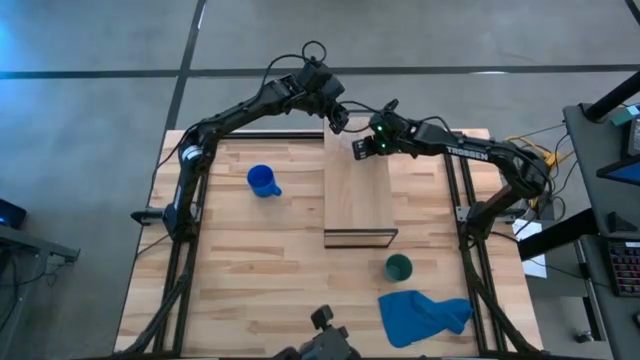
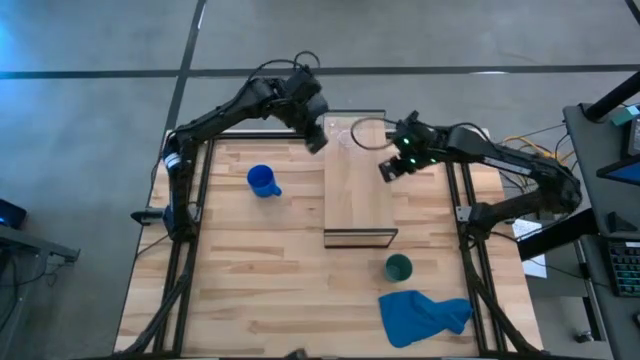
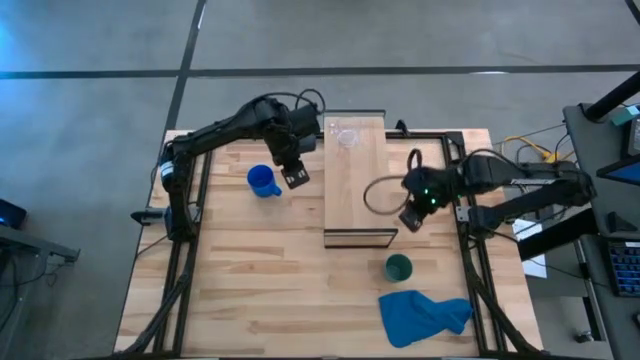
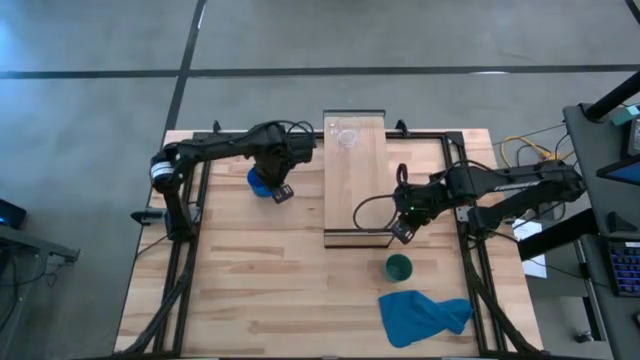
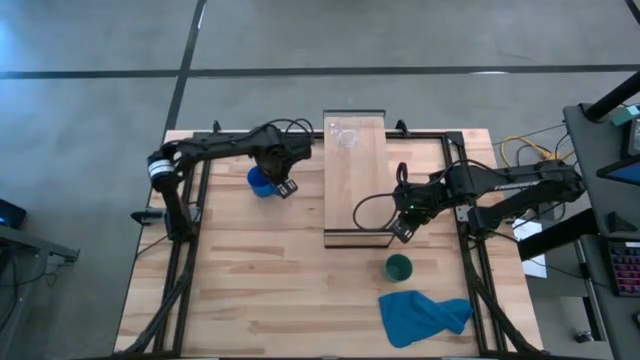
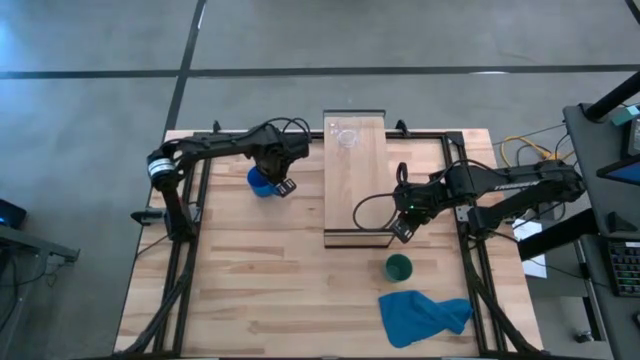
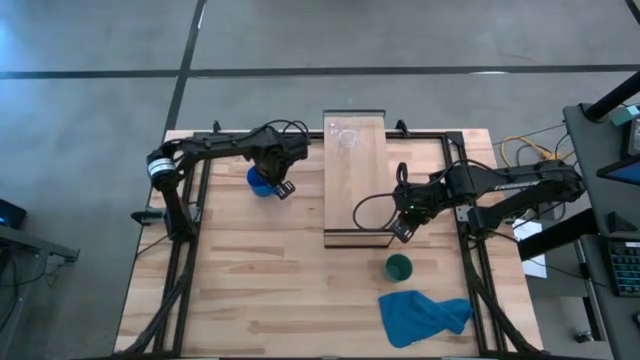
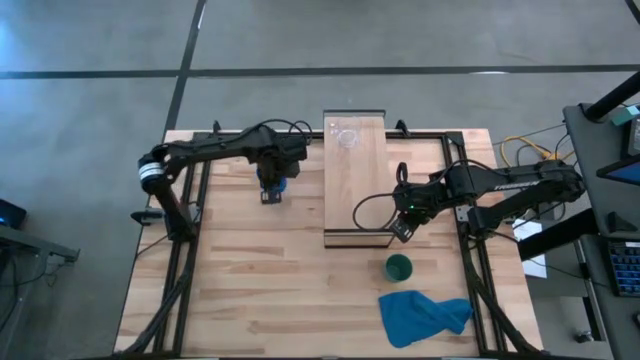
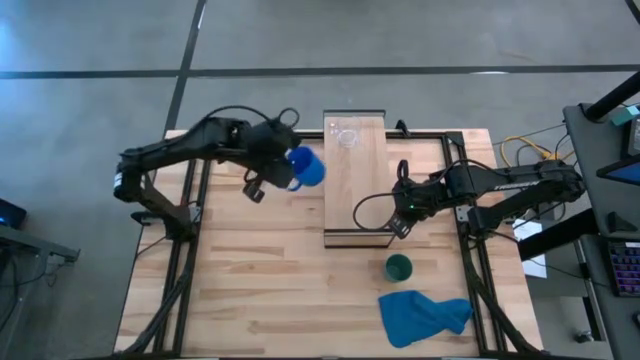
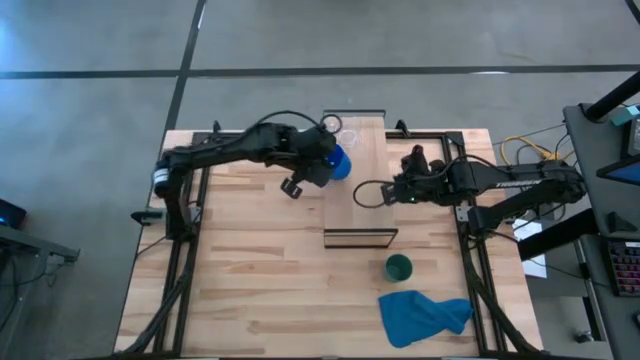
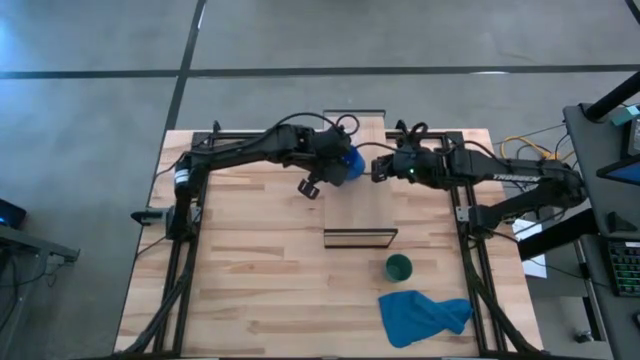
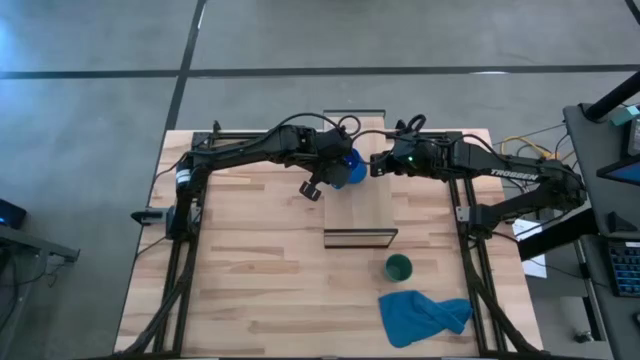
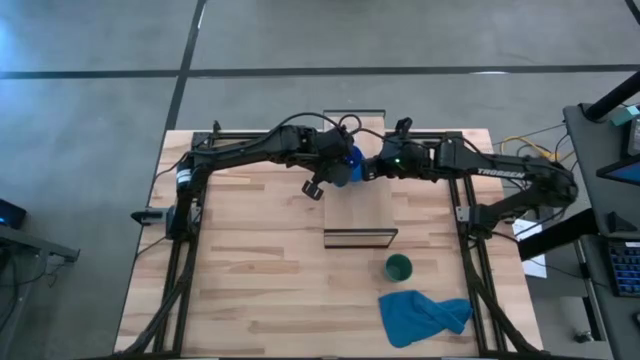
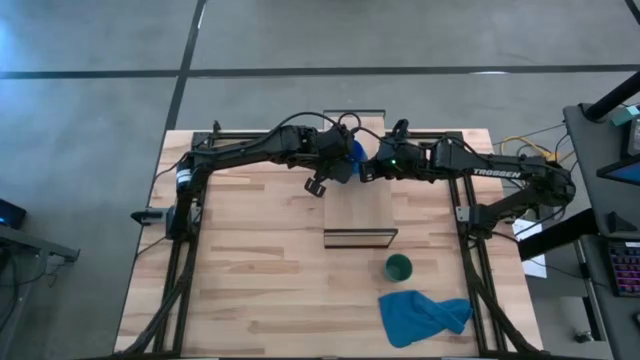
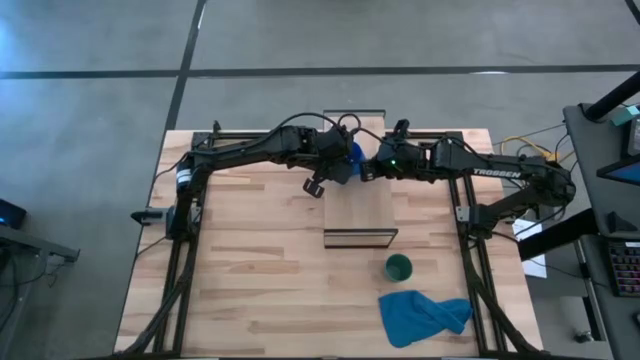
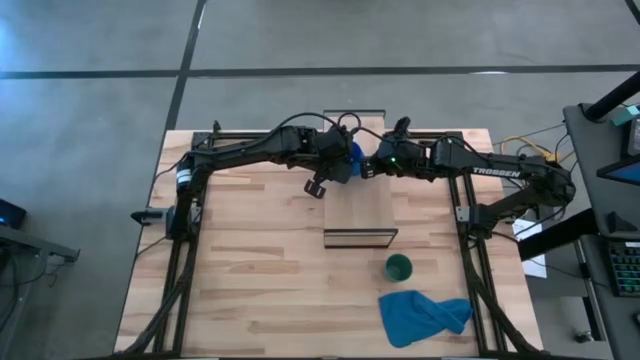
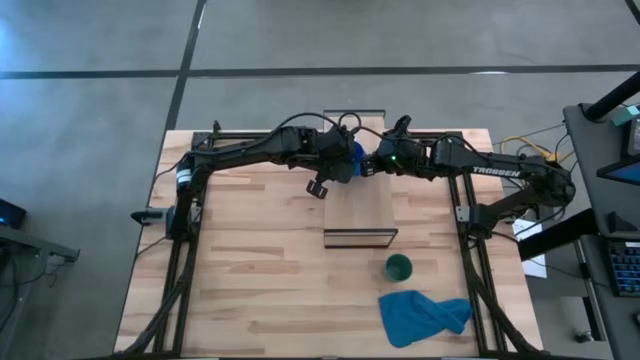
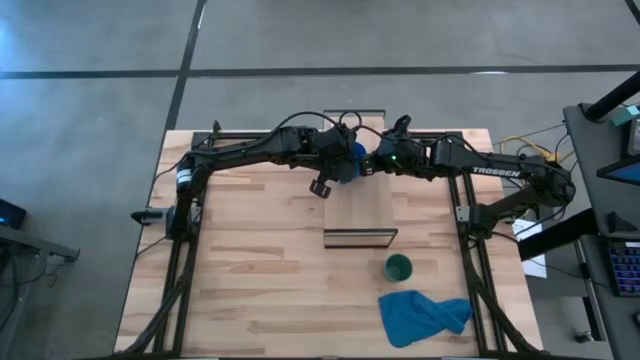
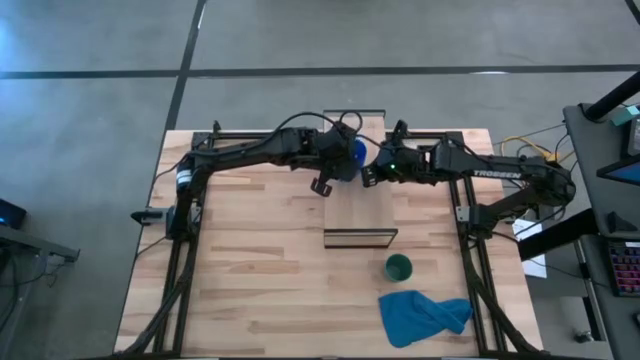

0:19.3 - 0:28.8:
Task: Stack small to large cups/mugs on shelf
Put the blue mug on the shelf

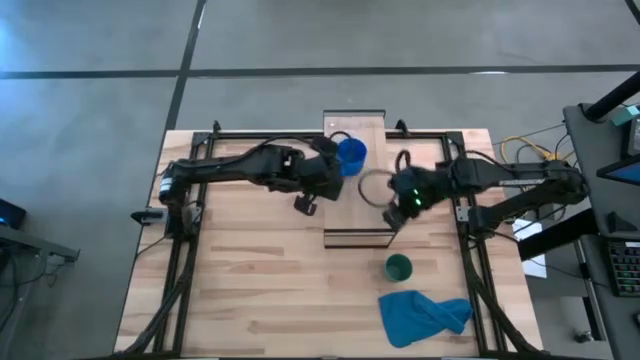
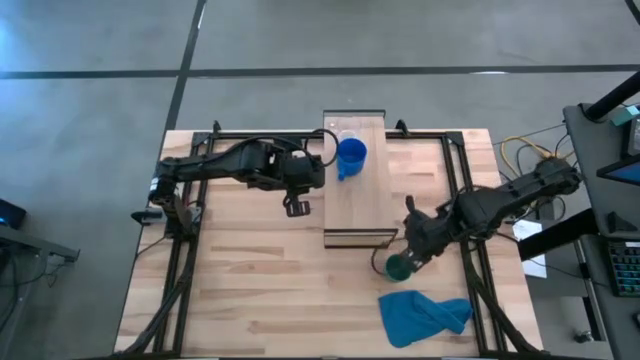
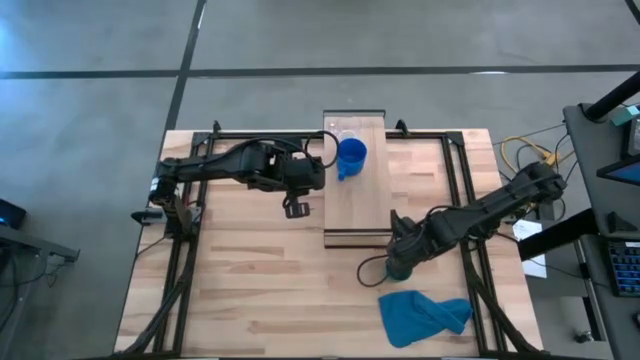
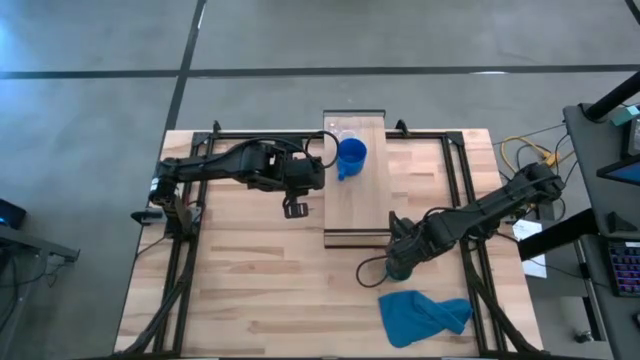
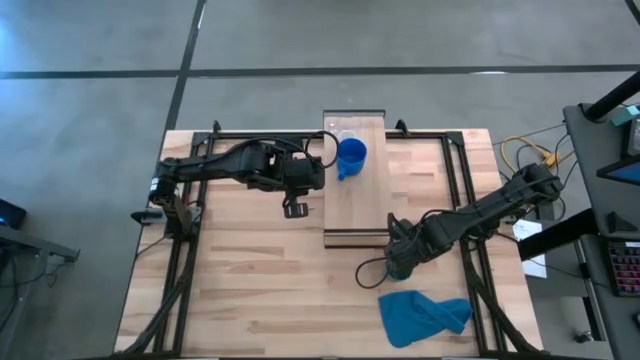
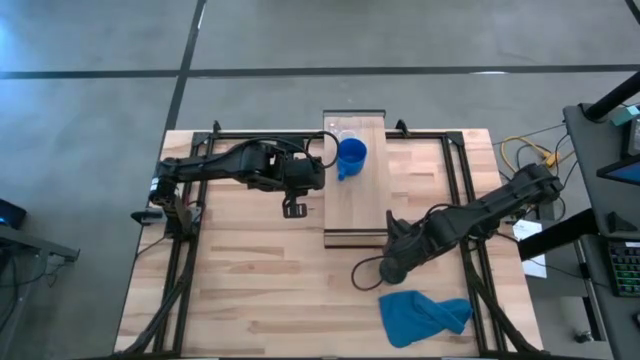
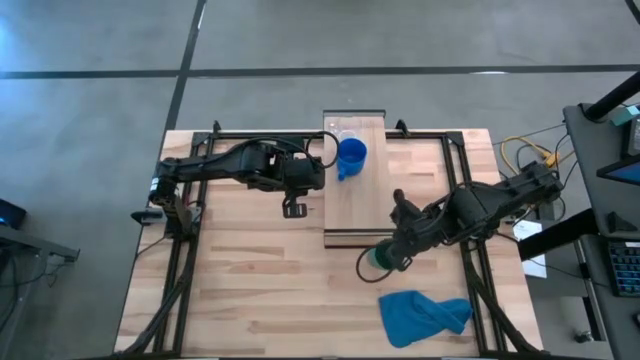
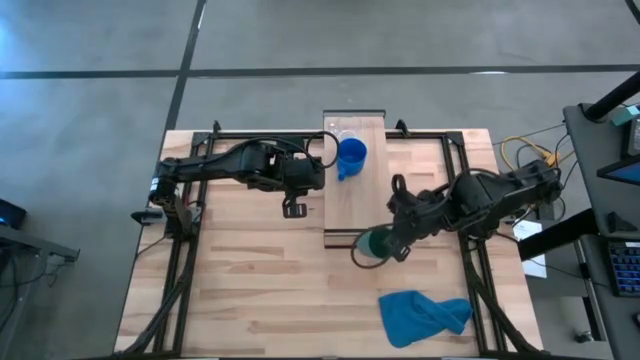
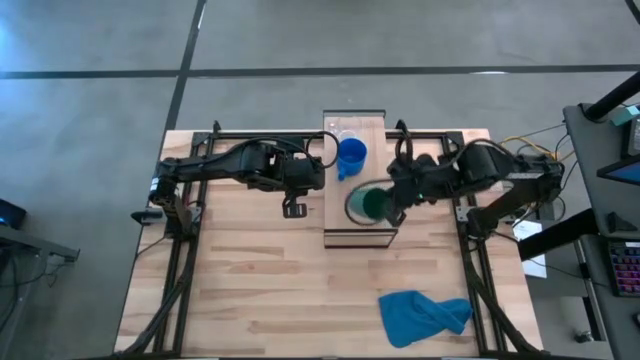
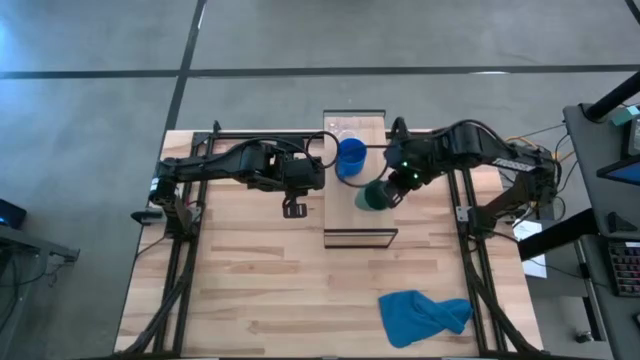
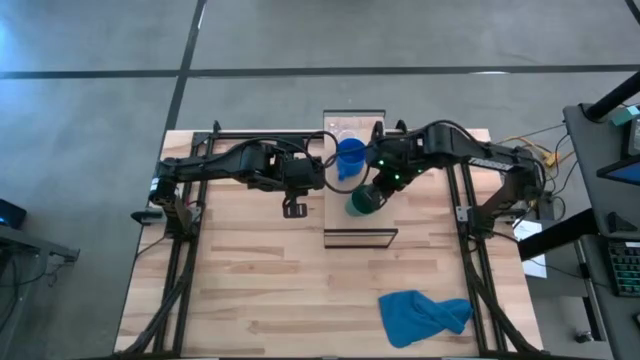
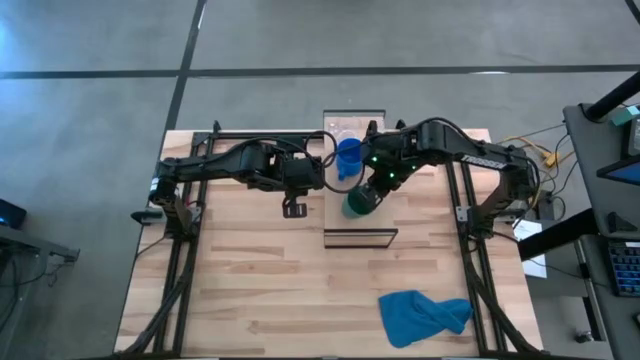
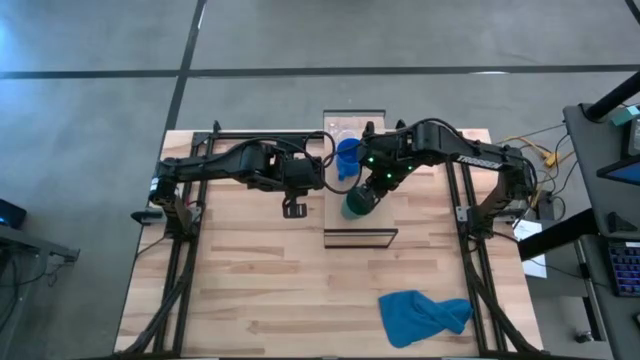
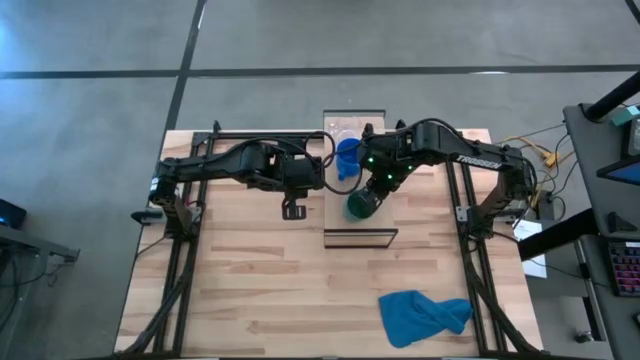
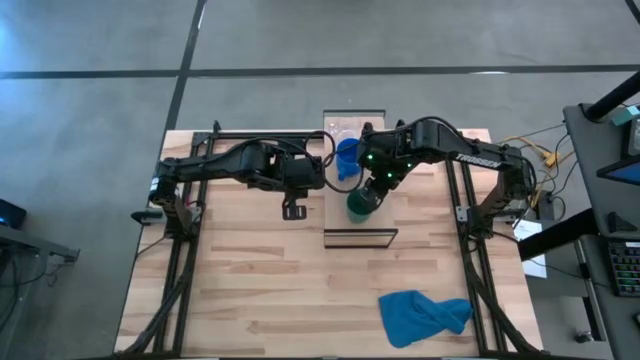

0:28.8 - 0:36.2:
Put the green cup on the shelf

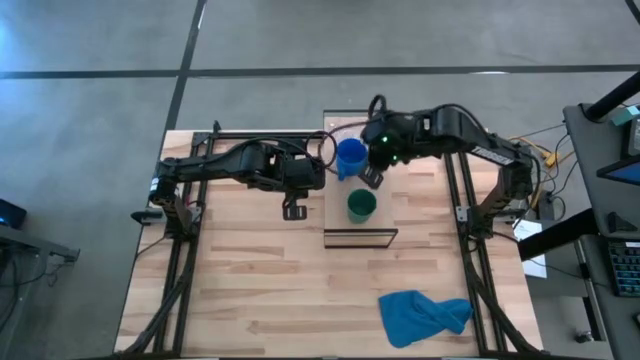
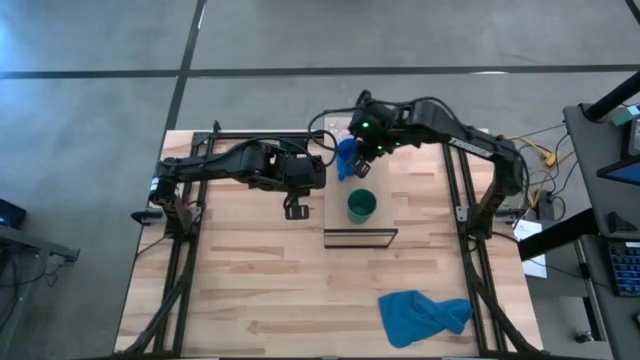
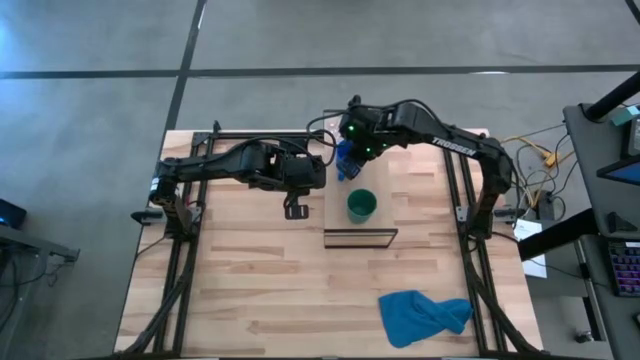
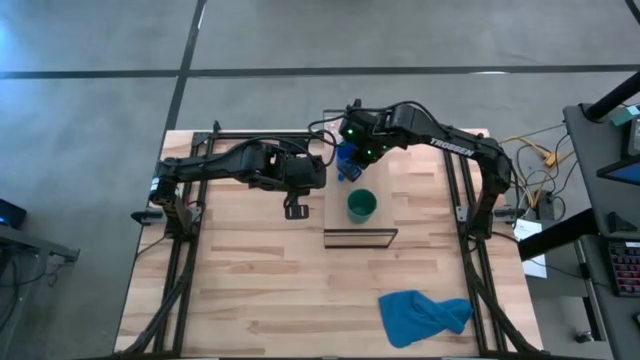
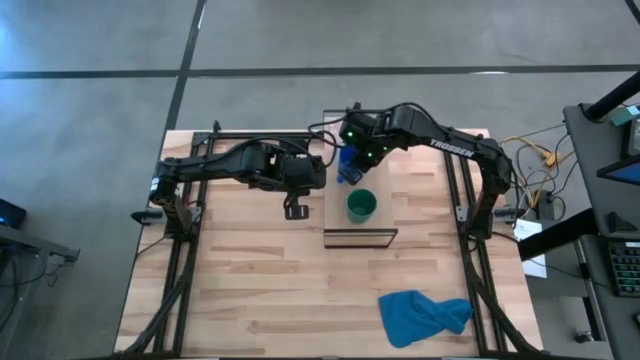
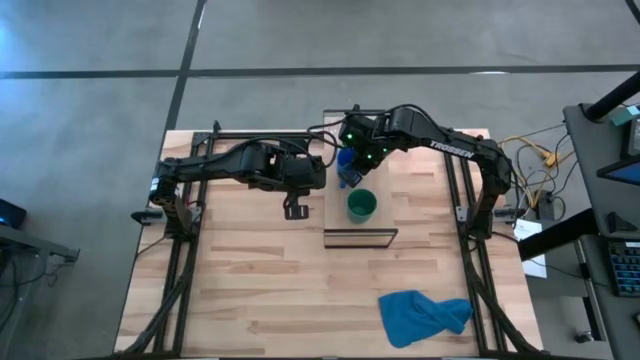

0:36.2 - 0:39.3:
Adjust the blue mug on the shelf

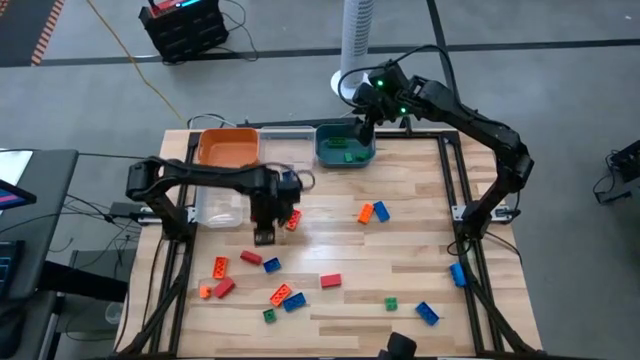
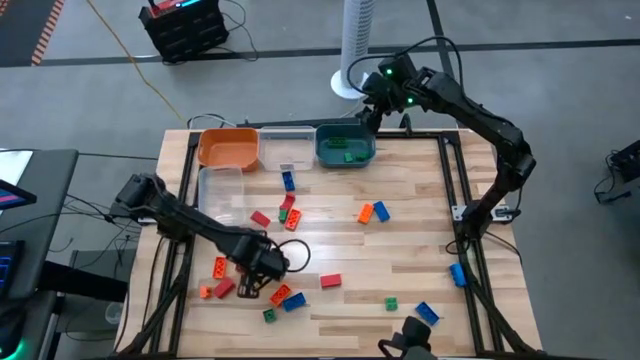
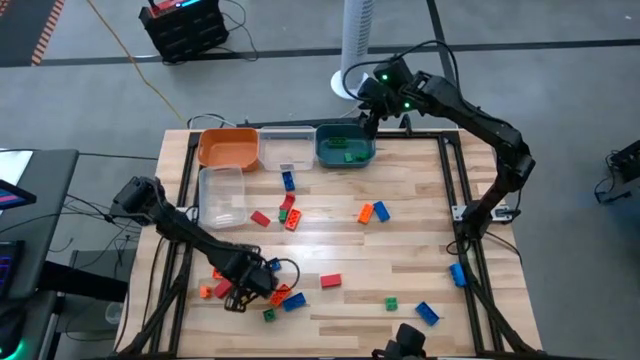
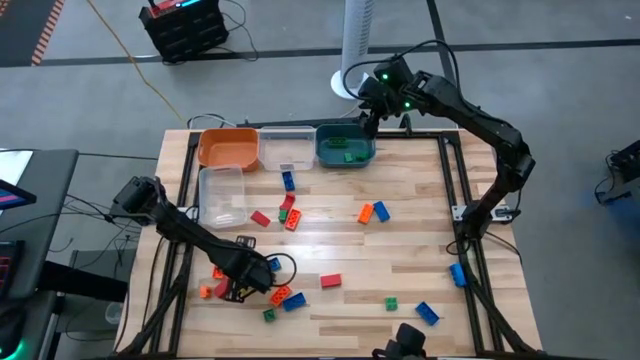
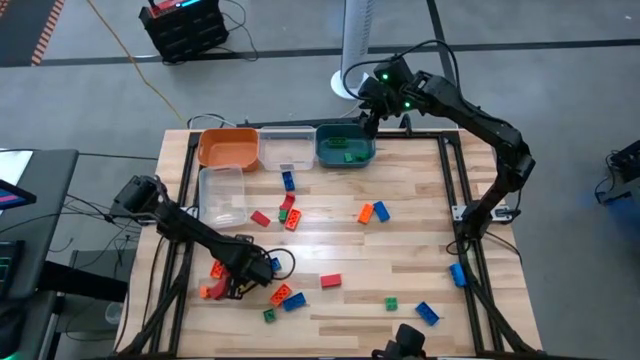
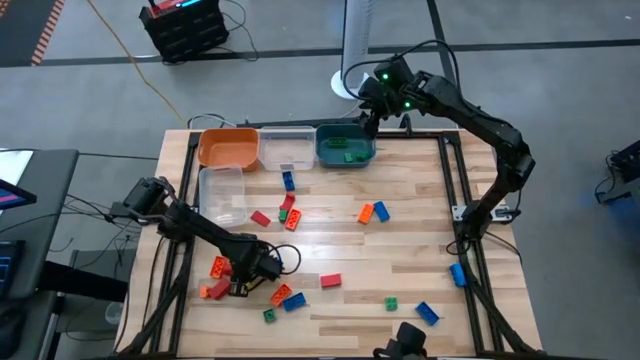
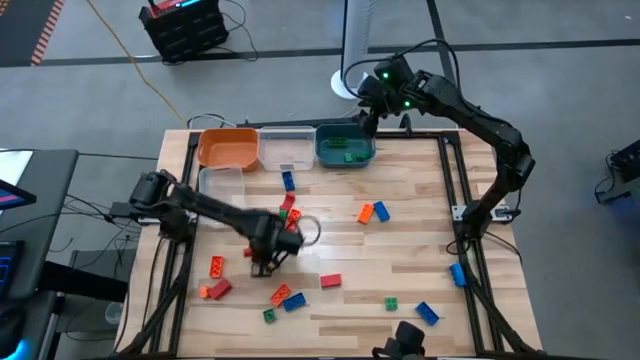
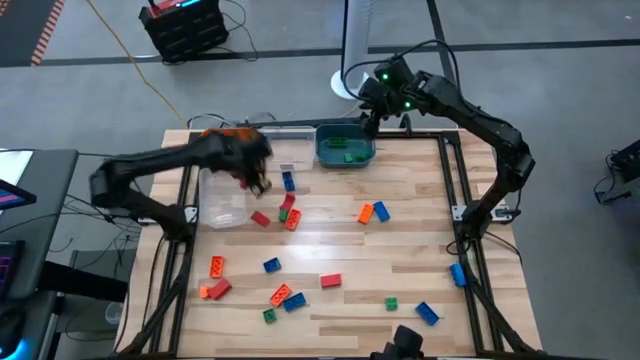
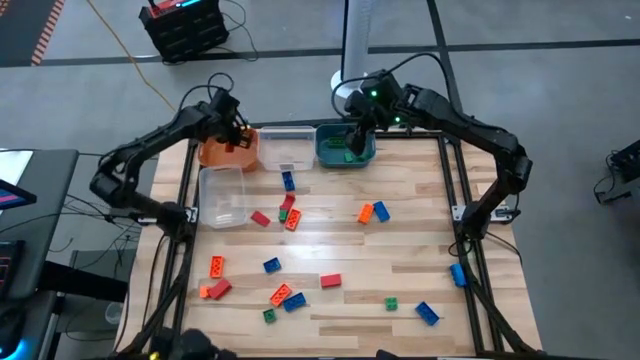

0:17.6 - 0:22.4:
Task: Sort blocks
Put the red block into the orange bin
